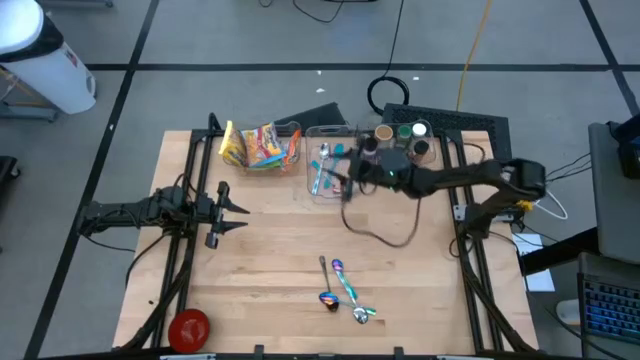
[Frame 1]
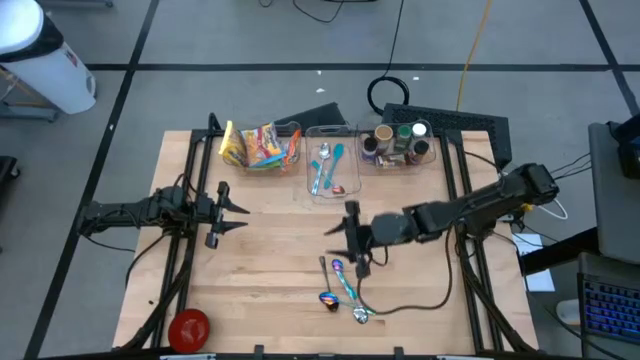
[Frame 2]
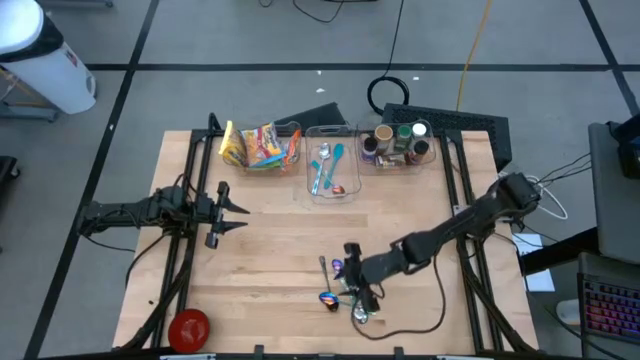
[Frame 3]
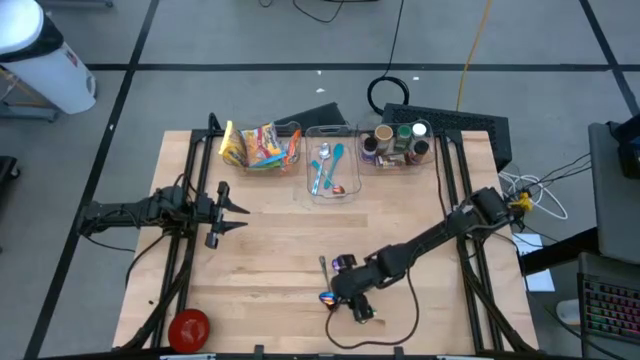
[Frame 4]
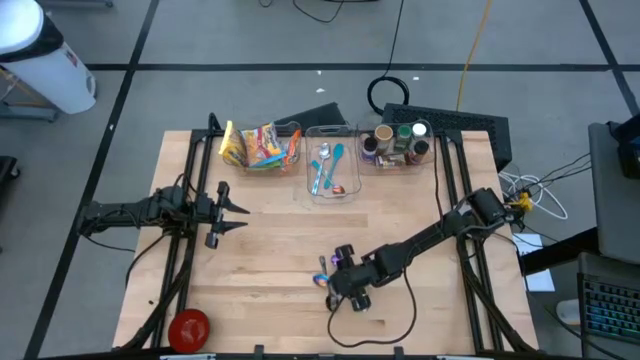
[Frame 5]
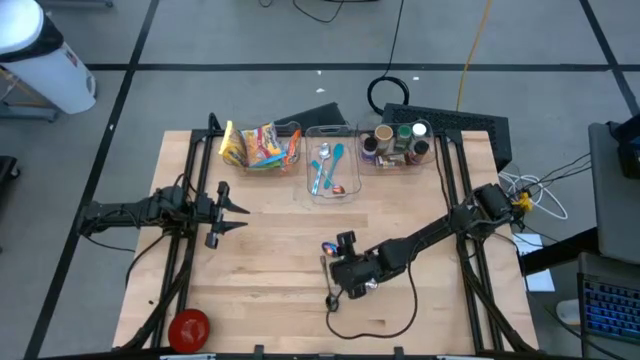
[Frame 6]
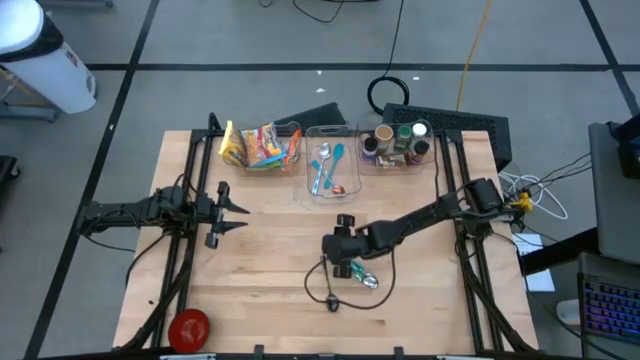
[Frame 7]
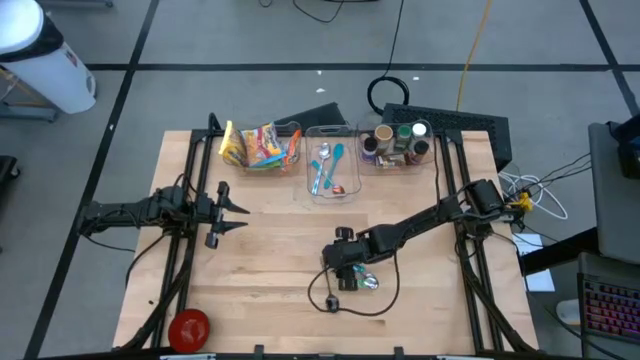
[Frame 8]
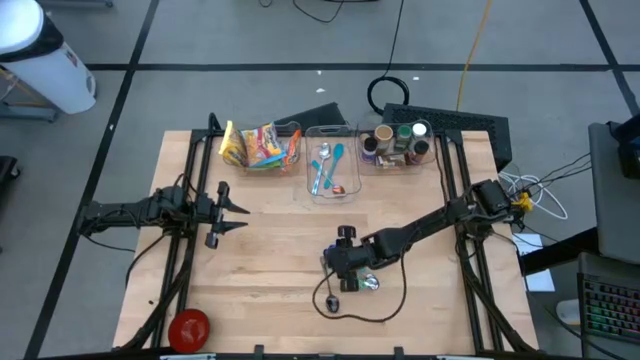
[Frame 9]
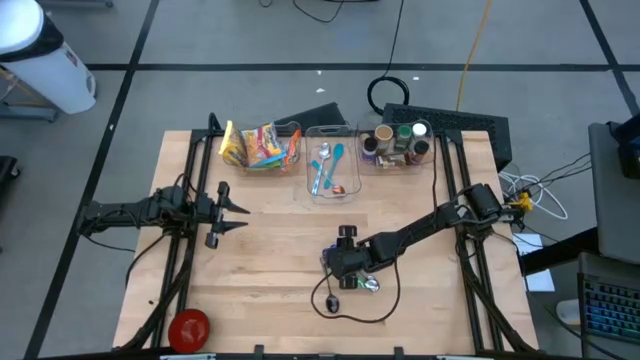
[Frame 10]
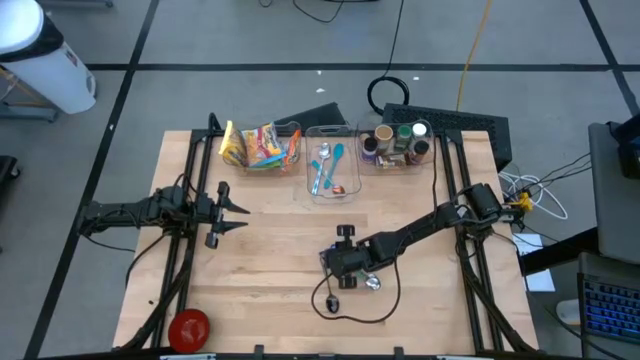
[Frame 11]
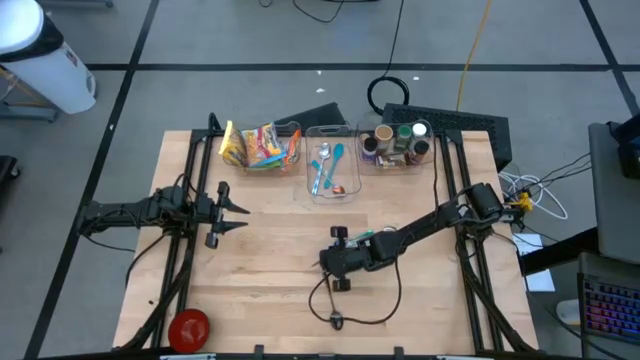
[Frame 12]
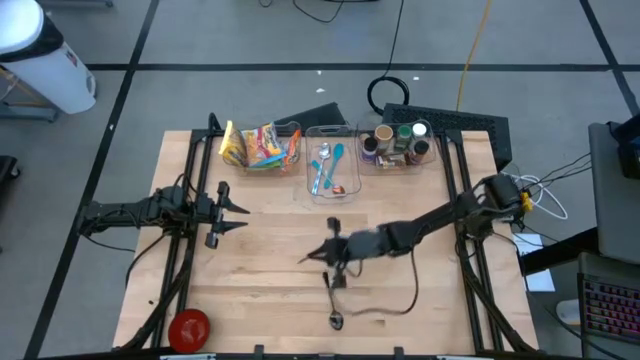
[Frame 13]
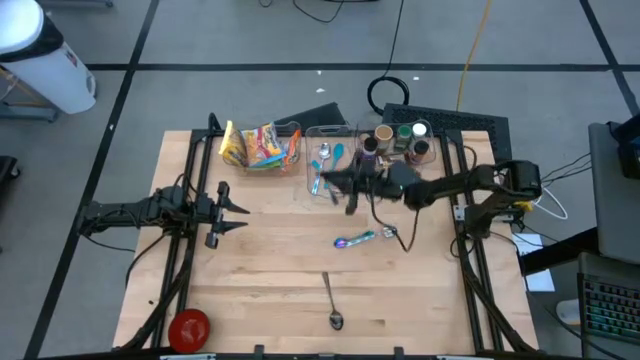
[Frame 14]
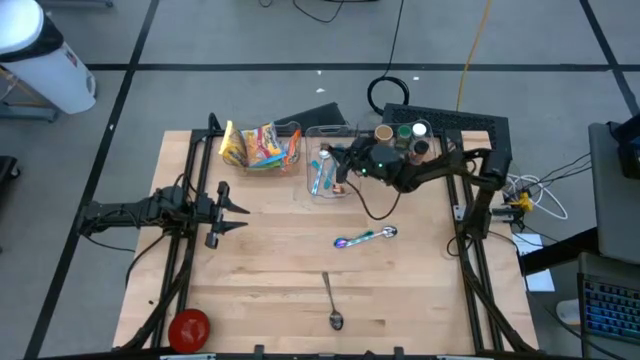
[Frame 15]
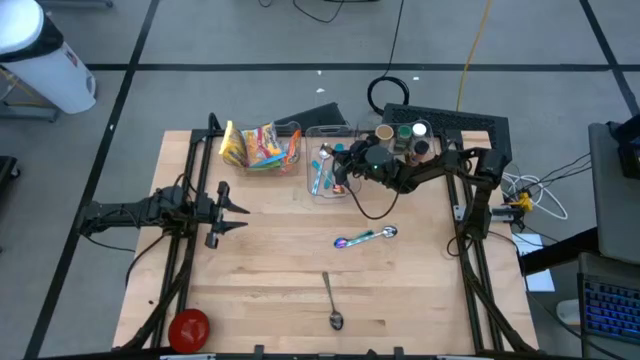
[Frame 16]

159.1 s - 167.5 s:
Task: Pick & Place Food Item
Put the purple spoon into the middle transparent bin

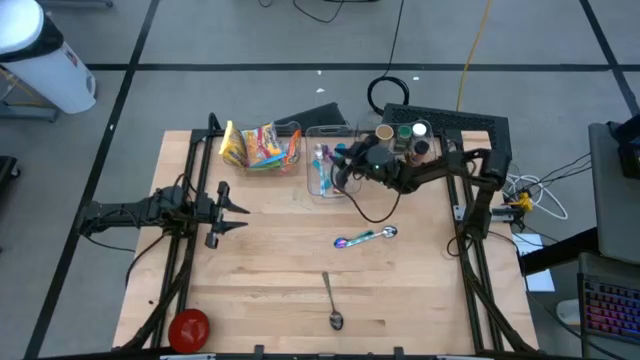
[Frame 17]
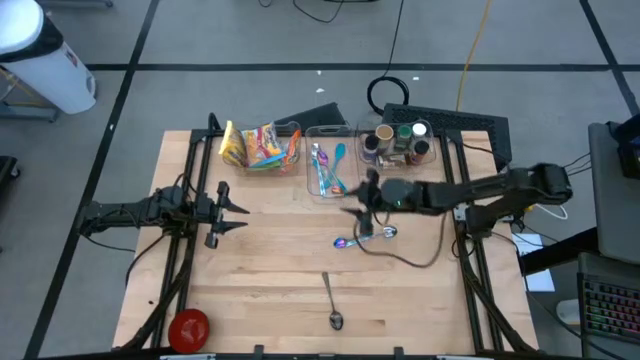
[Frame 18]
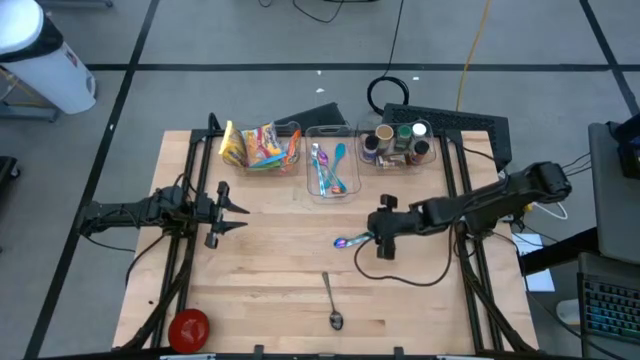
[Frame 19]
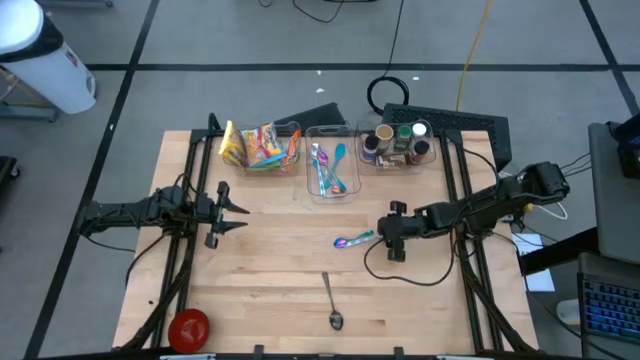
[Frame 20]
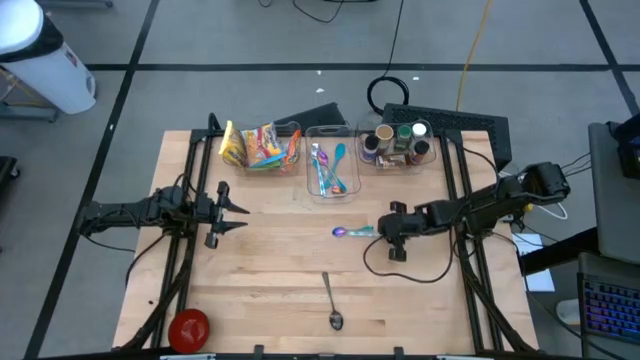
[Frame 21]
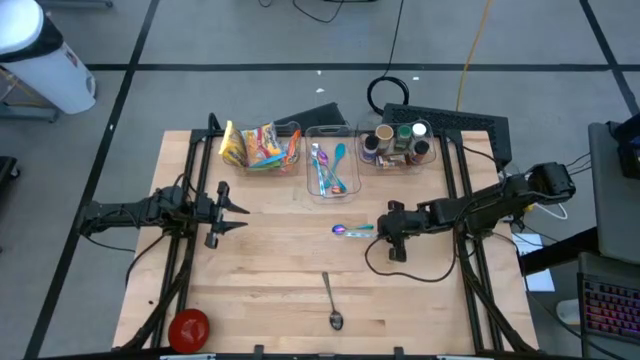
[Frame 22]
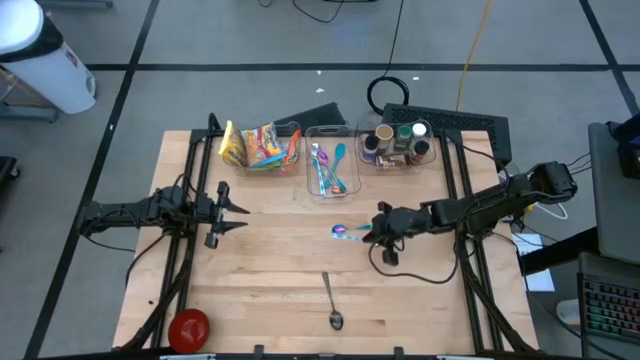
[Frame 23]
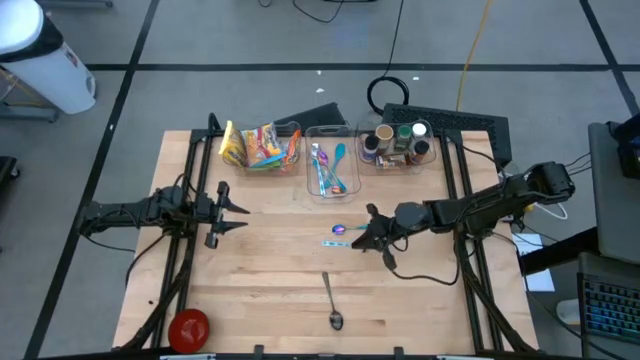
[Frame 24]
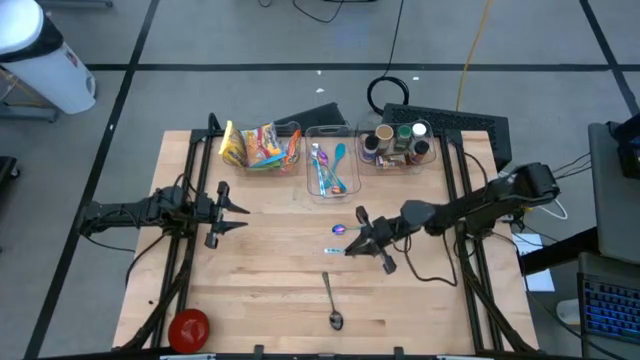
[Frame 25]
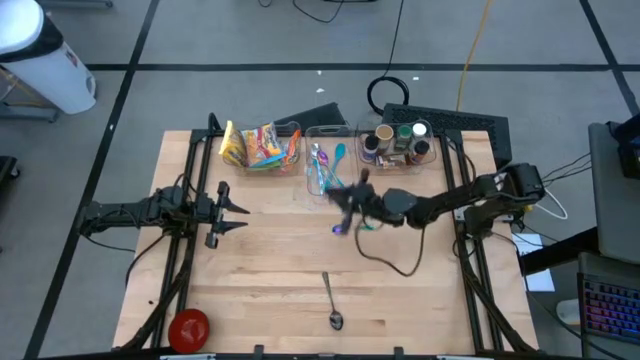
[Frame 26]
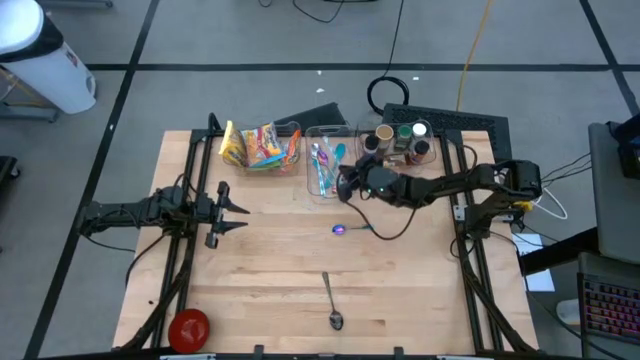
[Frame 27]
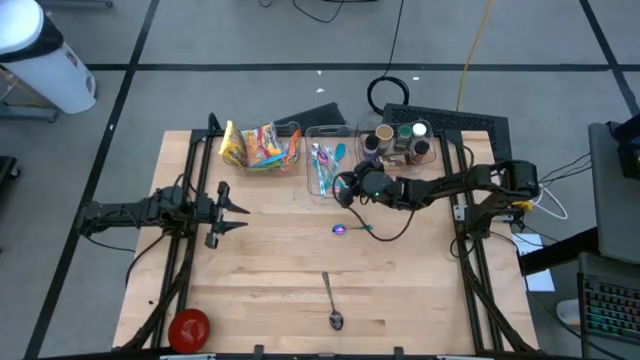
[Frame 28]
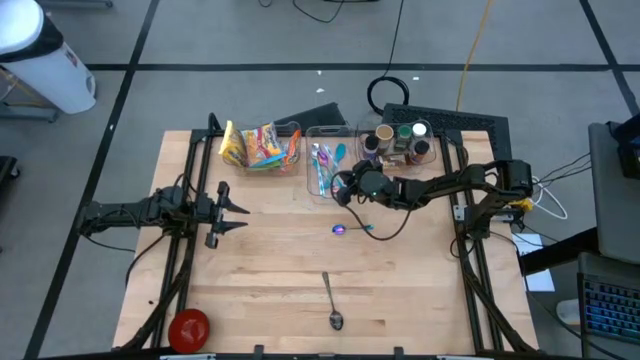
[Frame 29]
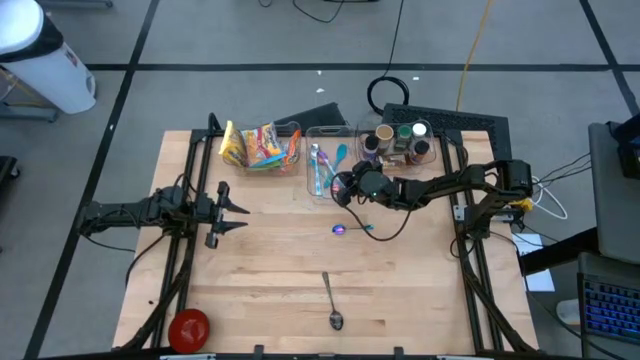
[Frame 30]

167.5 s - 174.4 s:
Put the blue spoon into the middle transparent bin

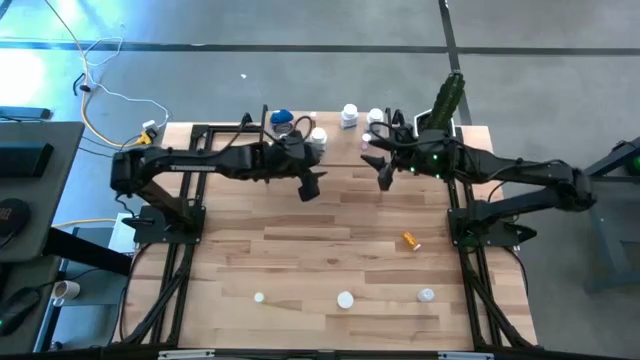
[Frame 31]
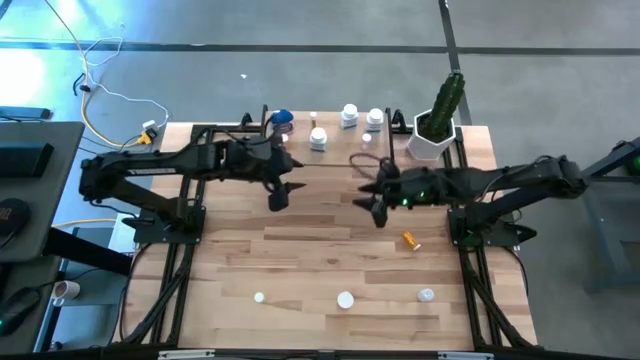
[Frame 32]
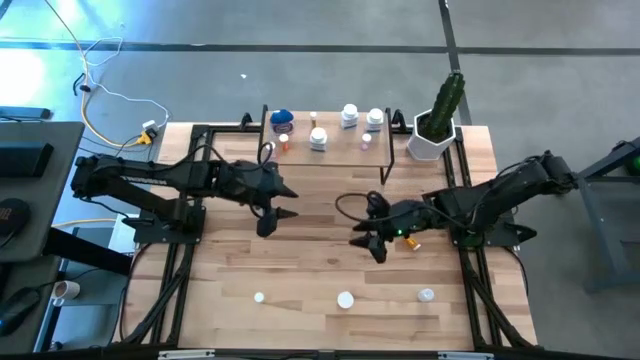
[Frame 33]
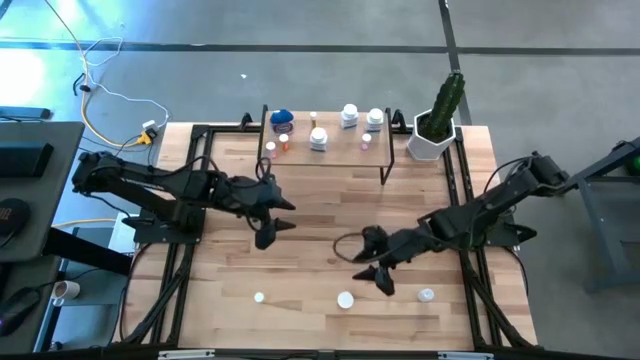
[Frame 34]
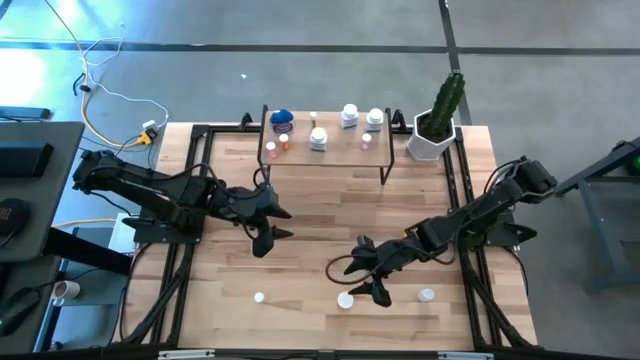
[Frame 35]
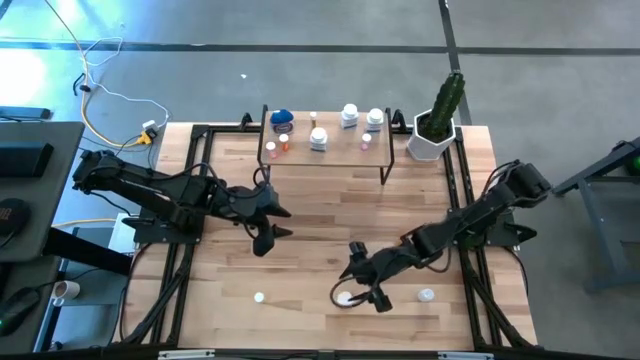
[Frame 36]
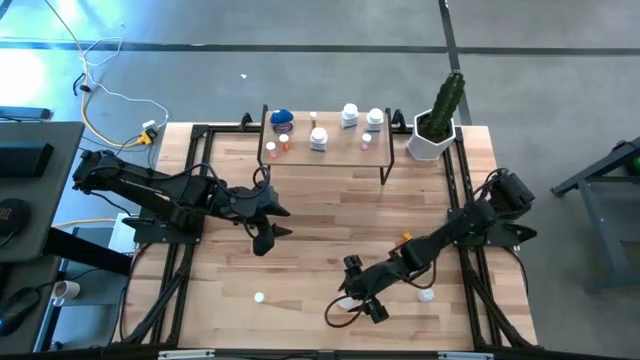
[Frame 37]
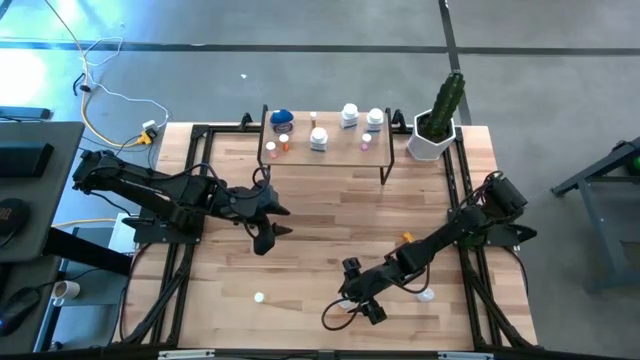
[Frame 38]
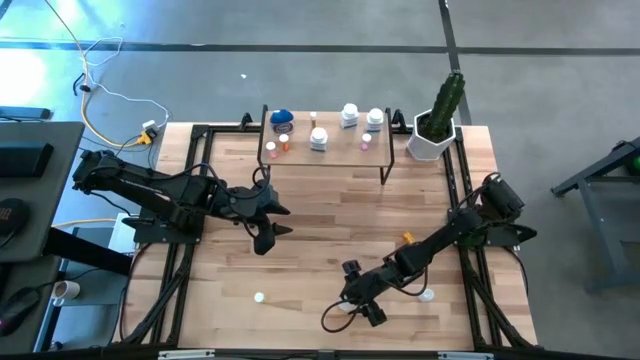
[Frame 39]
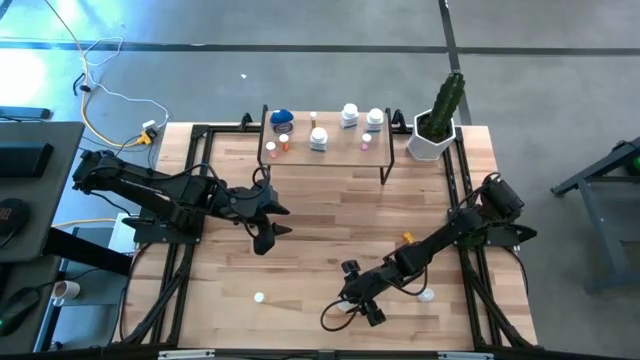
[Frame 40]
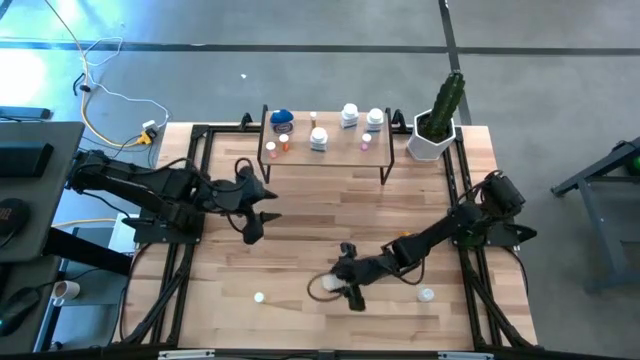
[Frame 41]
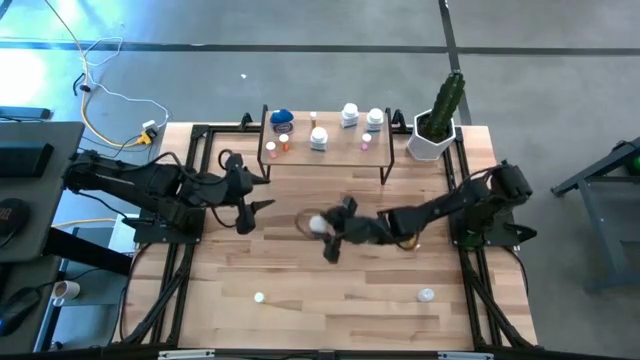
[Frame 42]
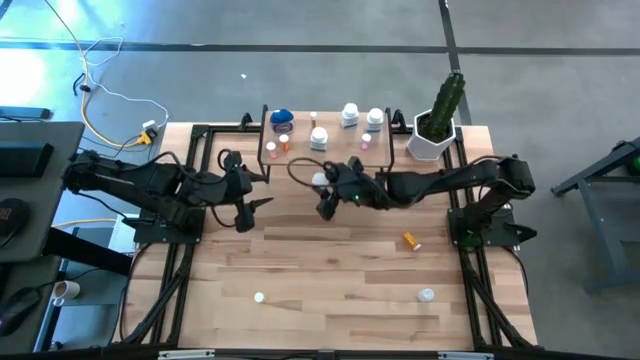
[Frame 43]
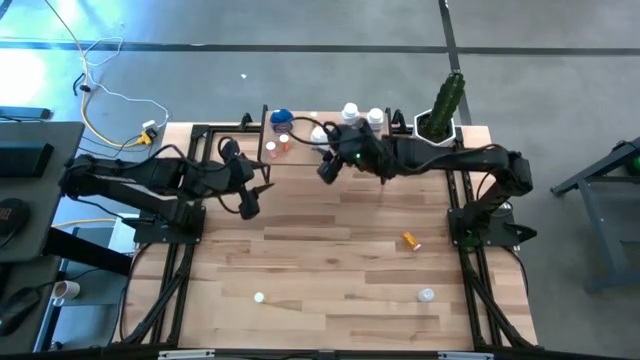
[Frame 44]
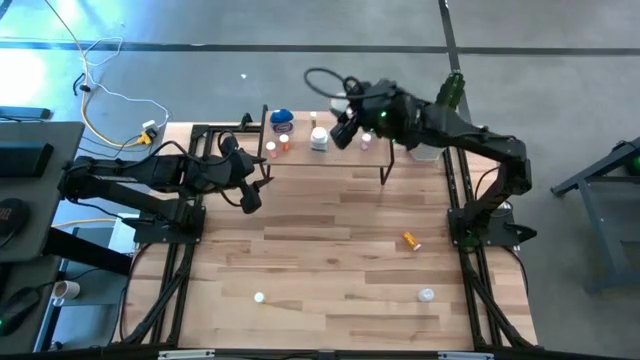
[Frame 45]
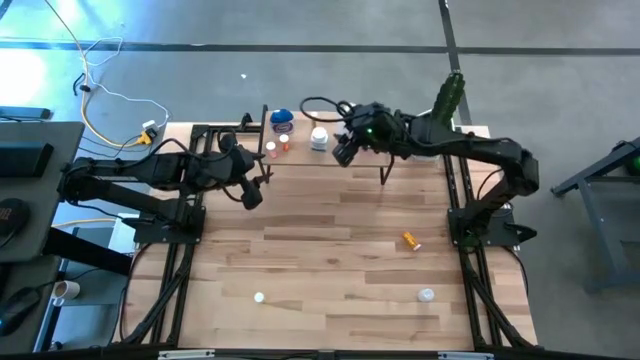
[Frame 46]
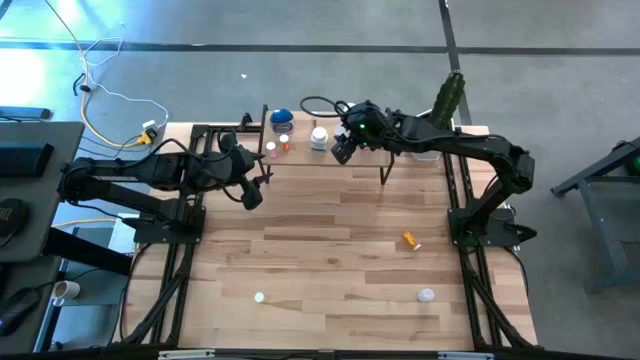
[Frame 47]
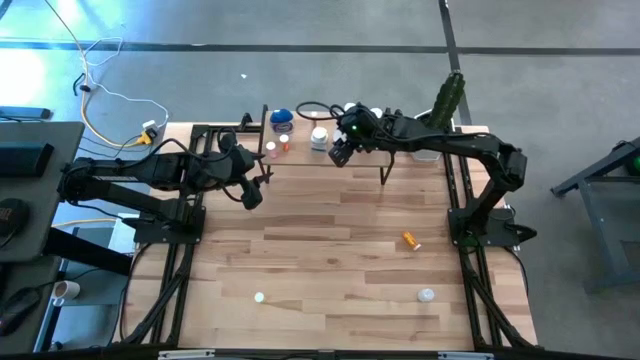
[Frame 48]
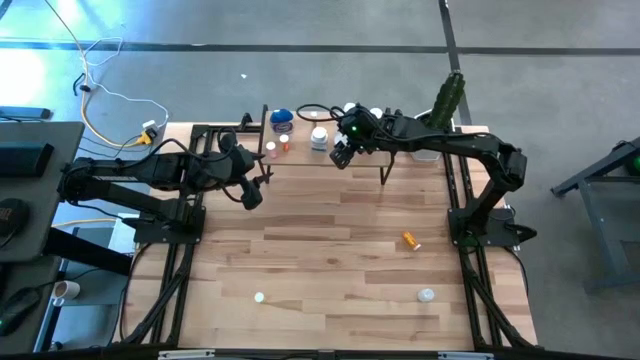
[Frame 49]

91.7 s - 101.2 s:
Task: Pick and place medicine bottles onto shelf by color
Put the orange pill bottle on the shelf
